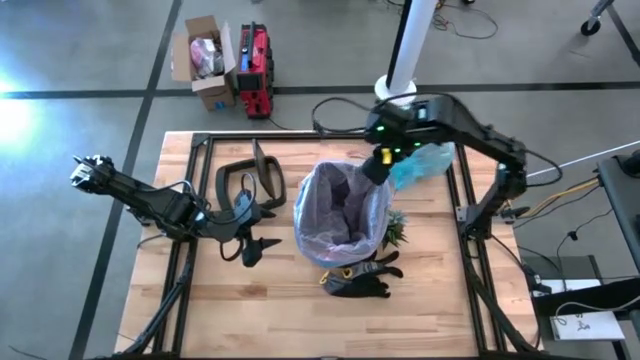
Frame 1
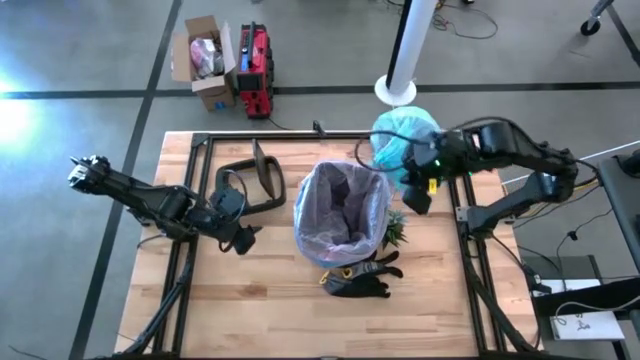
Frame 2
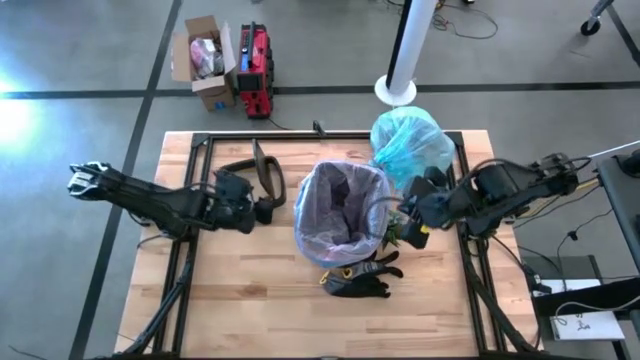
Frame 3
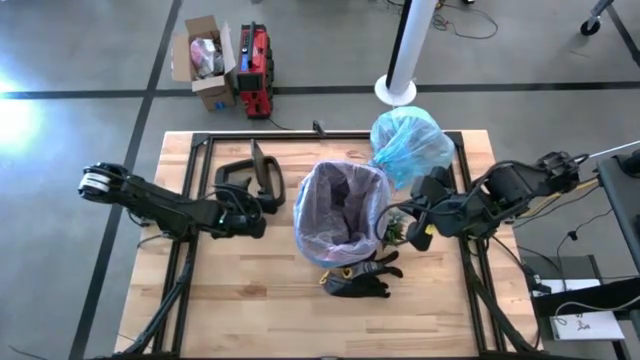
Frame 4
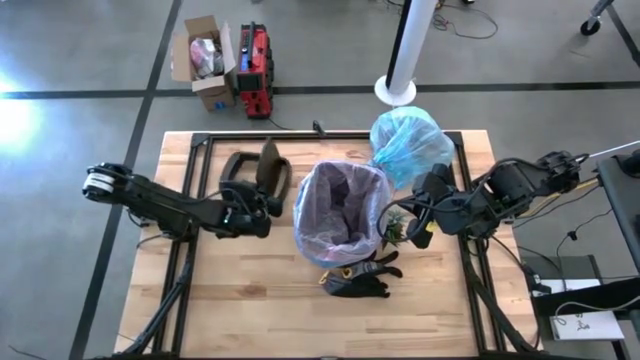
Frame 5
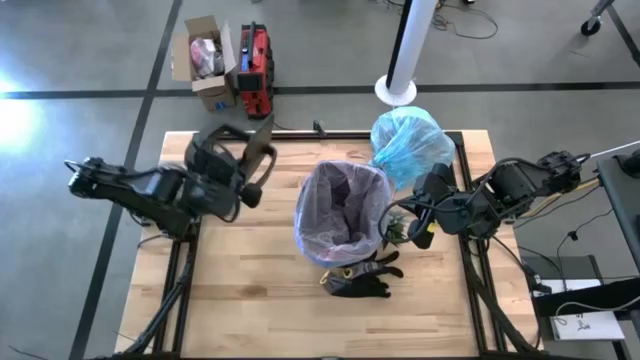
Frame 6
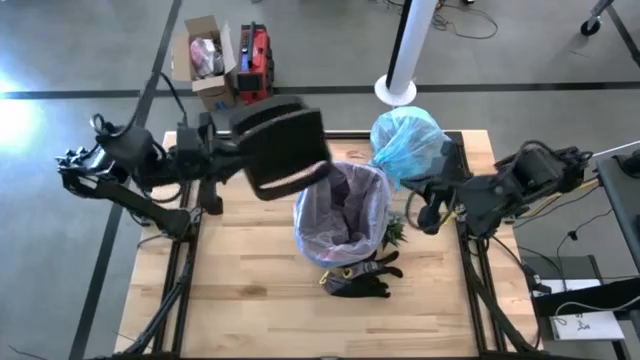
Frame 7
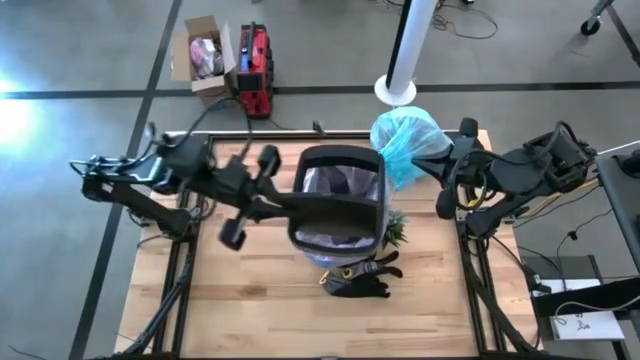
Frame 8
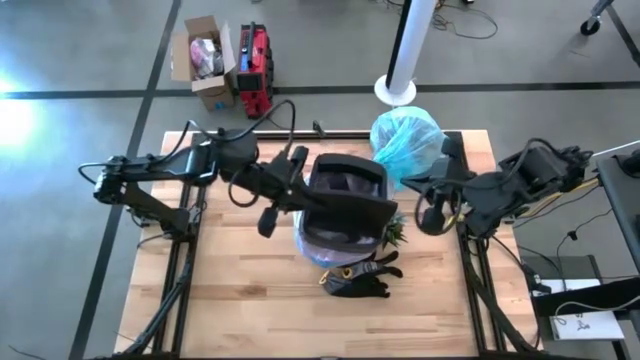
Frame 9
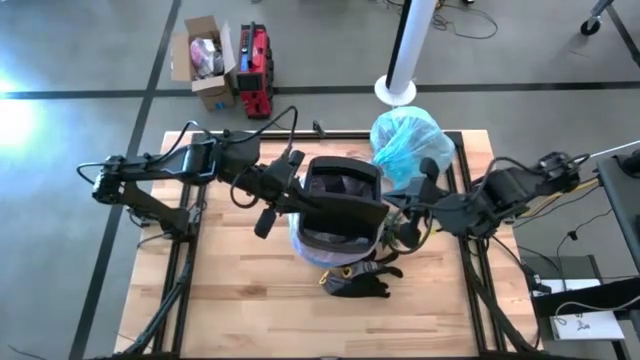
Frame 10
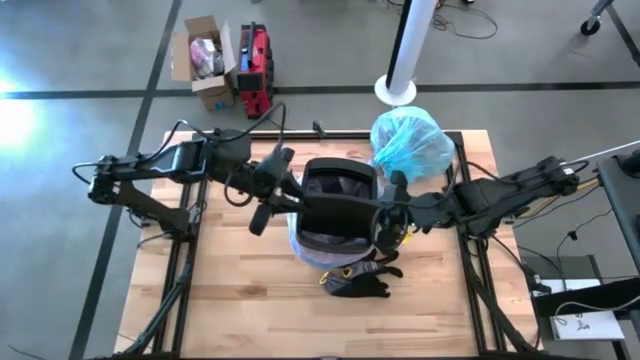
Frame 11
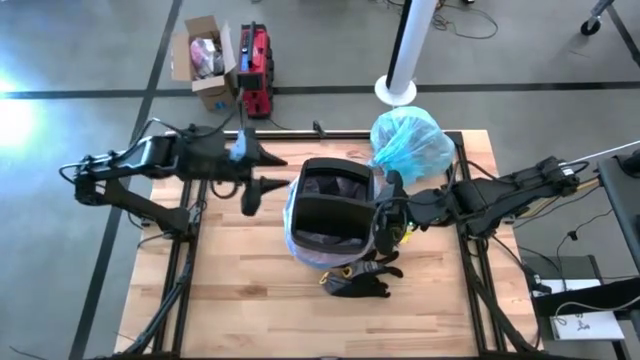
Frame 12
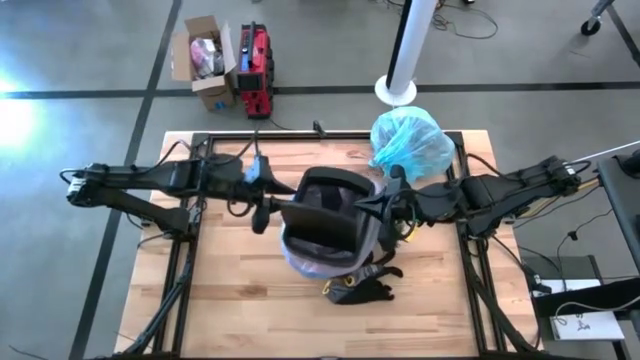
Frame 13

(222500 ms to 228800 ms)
Task: place trash/remove bag and relplace
Put the trash bin lid on the trash bin

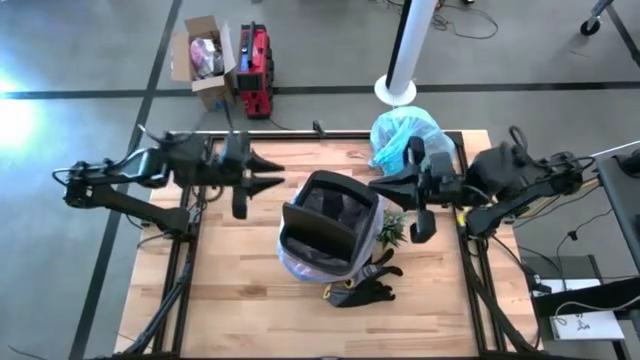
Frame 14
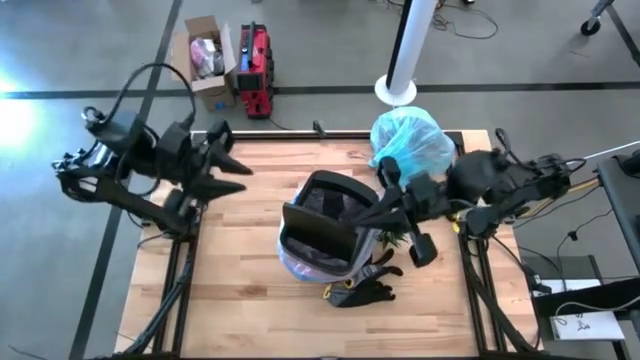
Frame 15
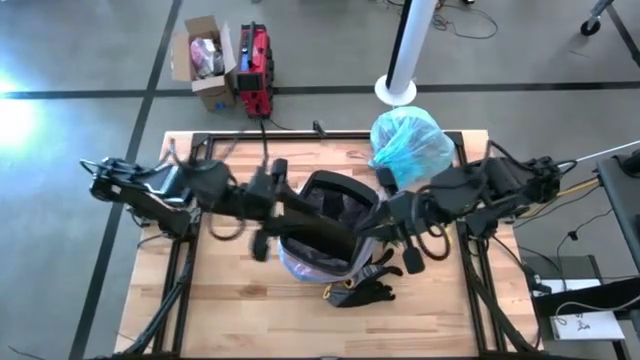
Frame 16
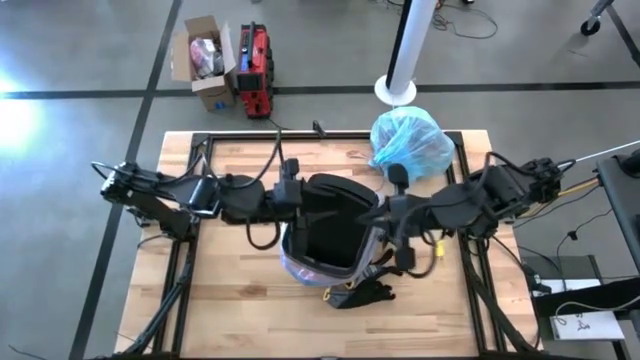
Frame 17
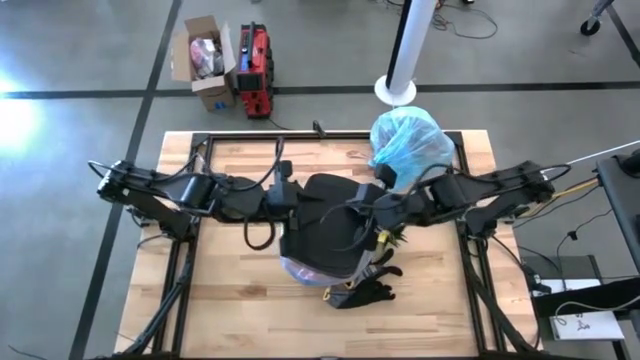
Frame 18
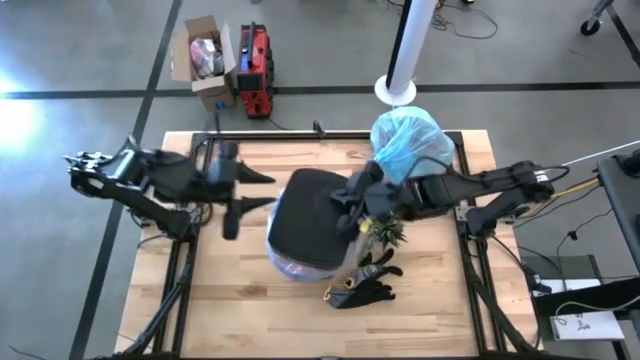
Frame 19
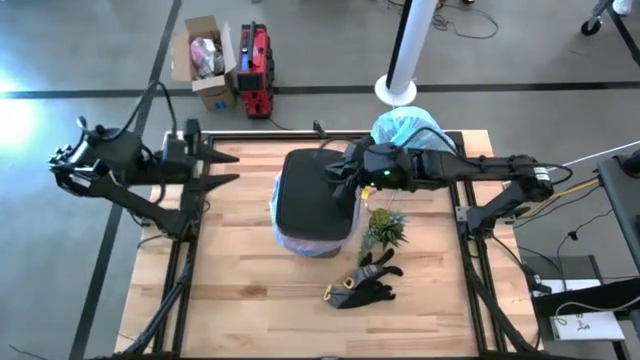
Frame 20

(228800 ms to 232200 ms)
Close the trash bin lid

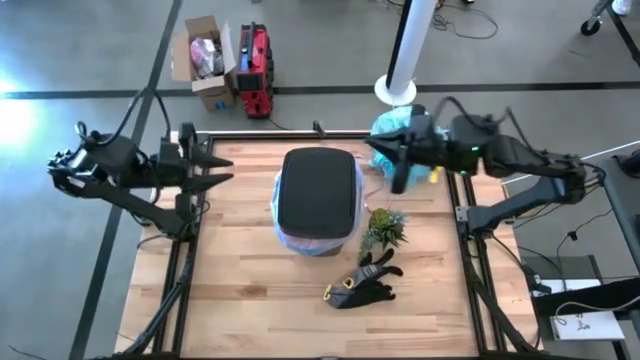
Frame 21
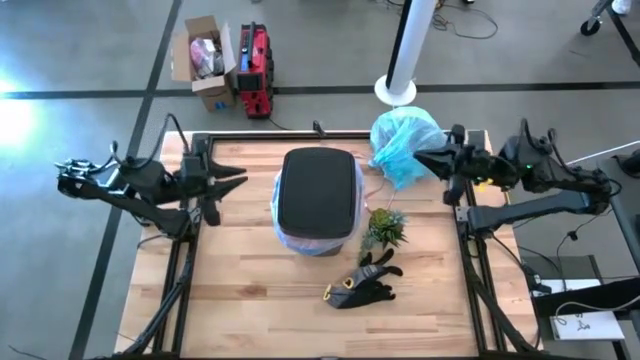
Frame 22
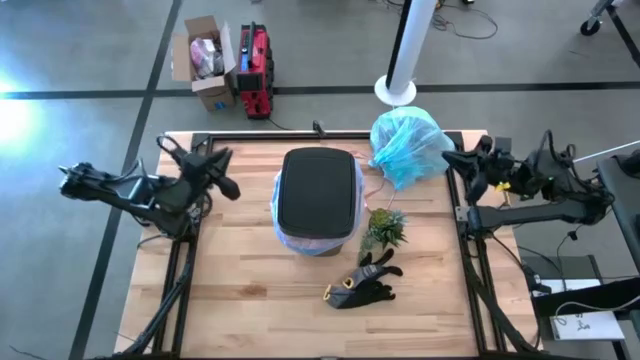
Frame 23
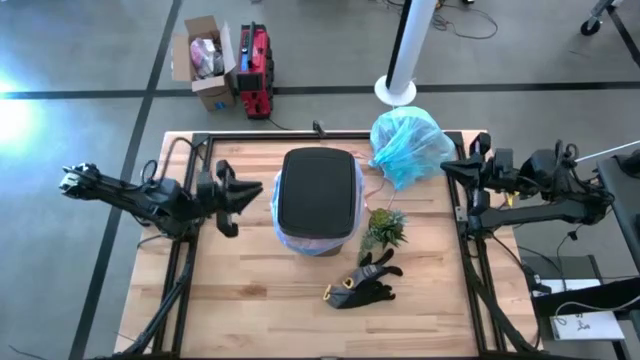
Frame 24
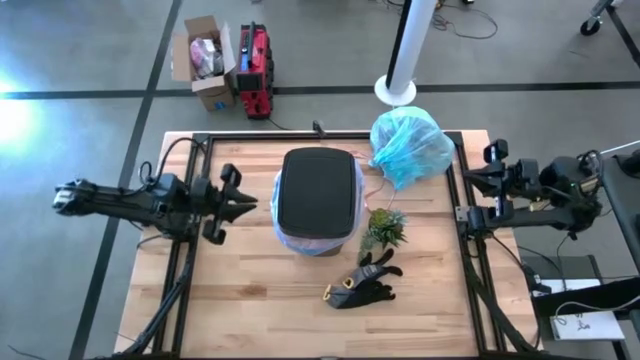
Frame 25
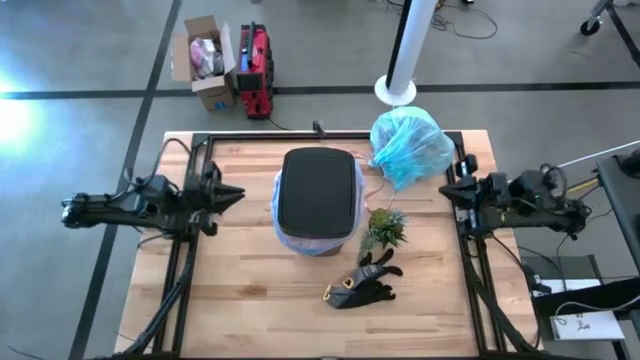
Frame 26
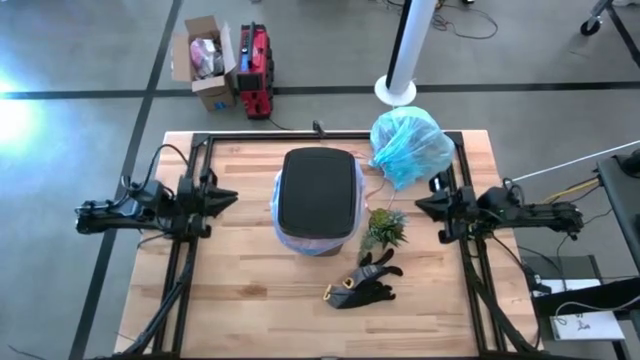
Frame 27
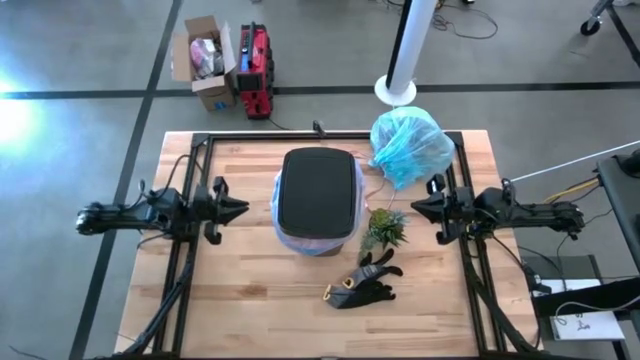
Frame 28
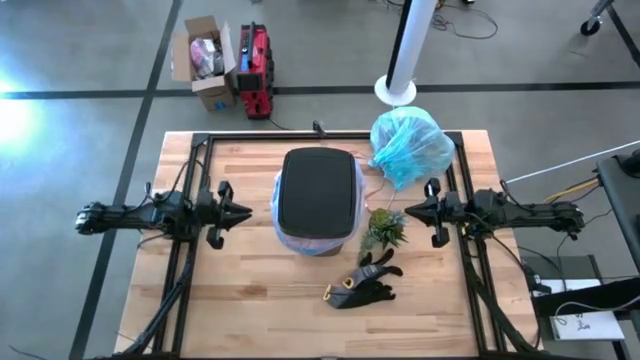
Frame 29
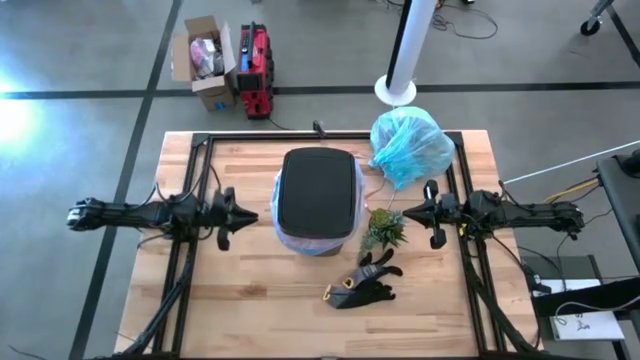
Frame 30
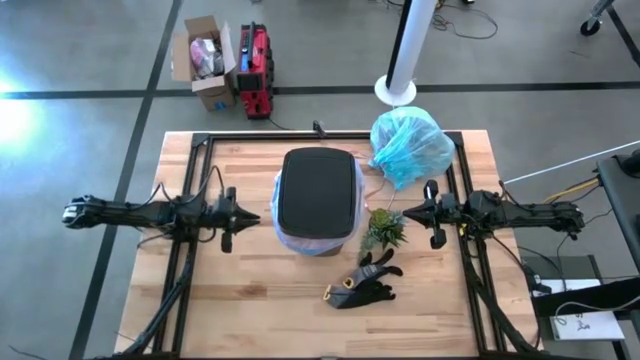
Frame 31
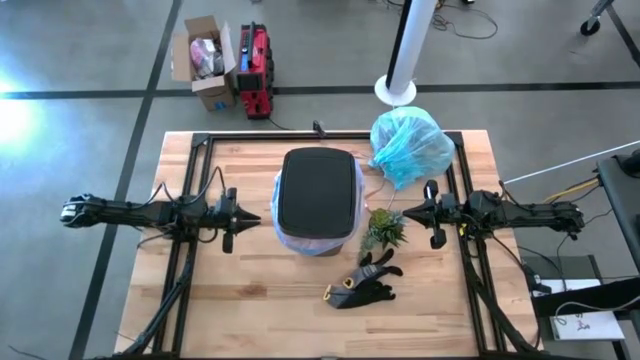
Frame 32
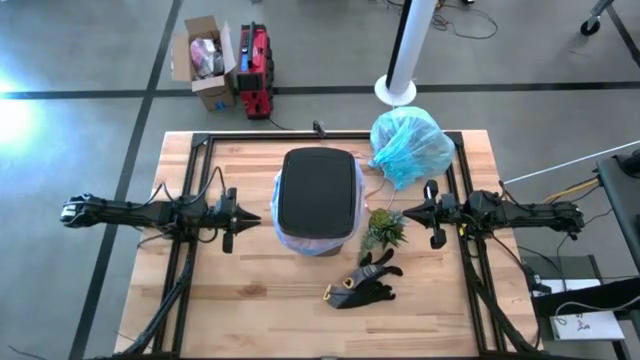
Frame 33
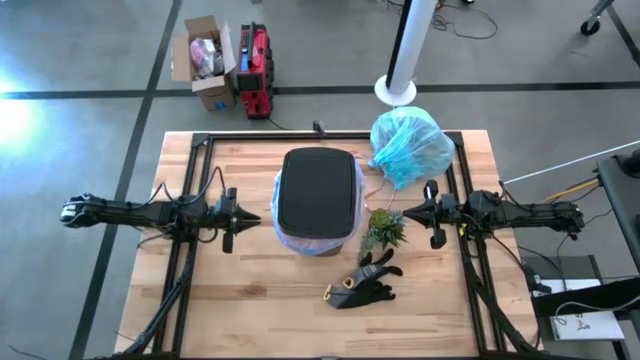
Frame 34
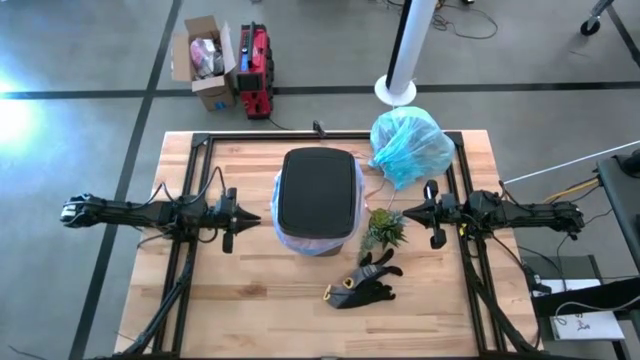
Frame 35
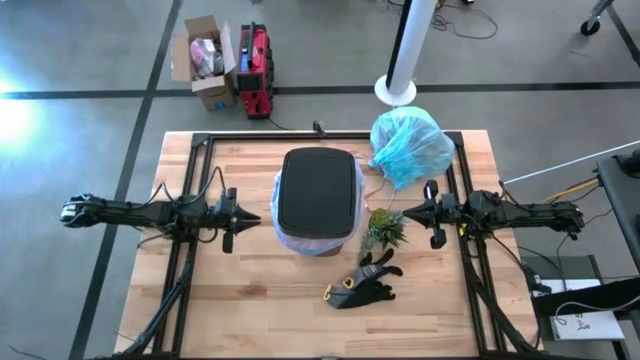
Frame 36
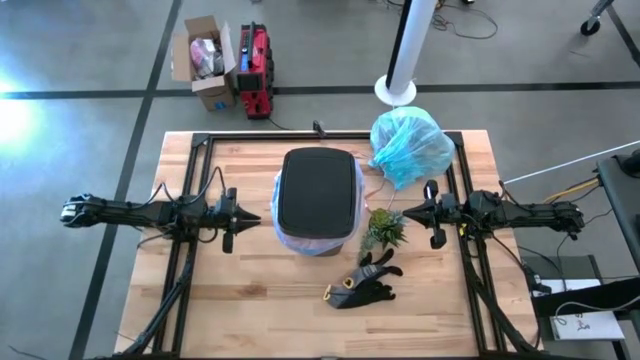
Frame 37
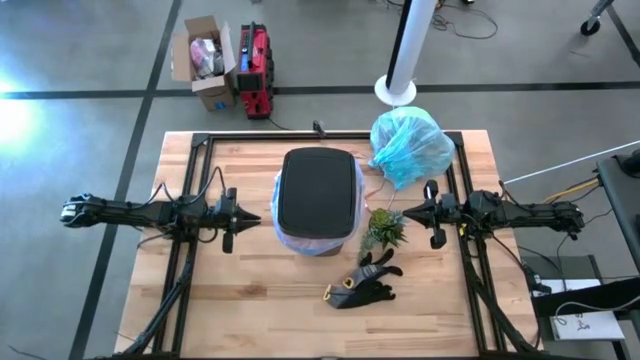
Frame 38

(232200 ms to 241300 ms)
Return to Home Position

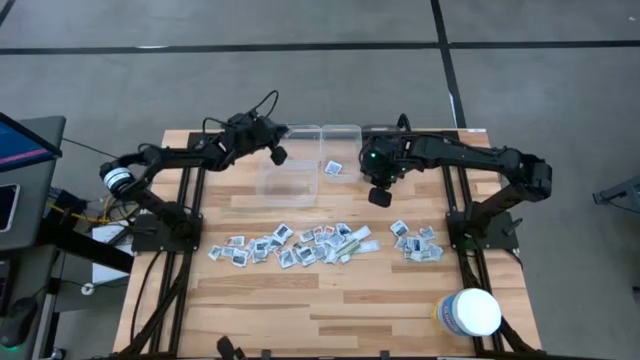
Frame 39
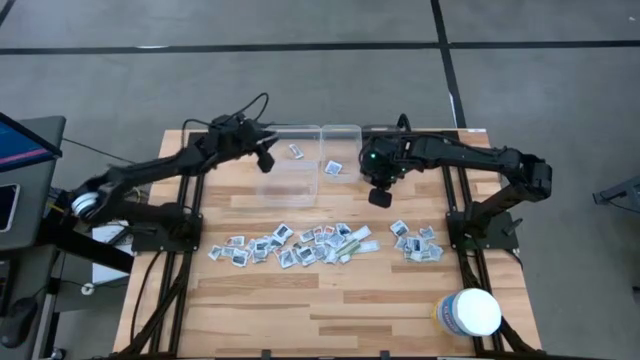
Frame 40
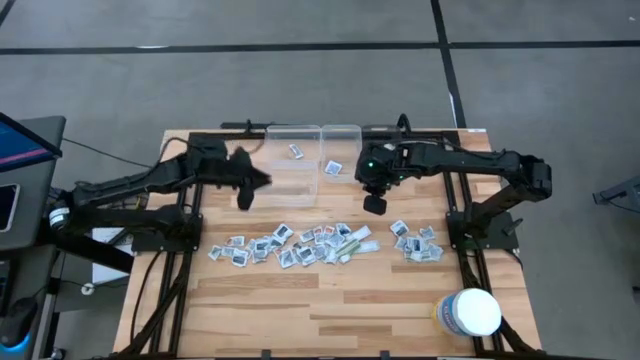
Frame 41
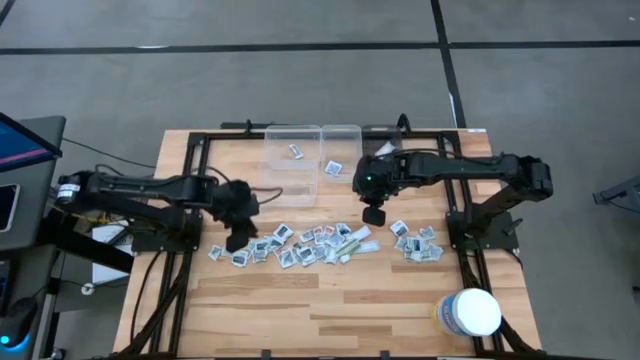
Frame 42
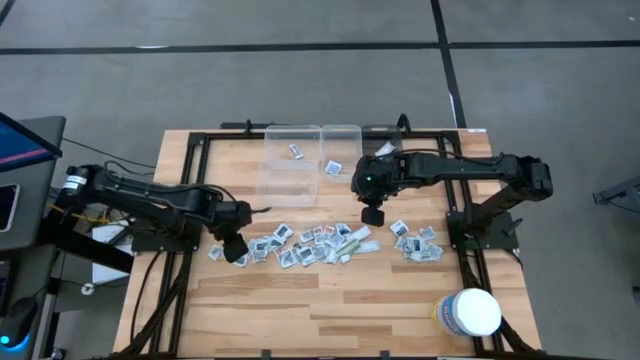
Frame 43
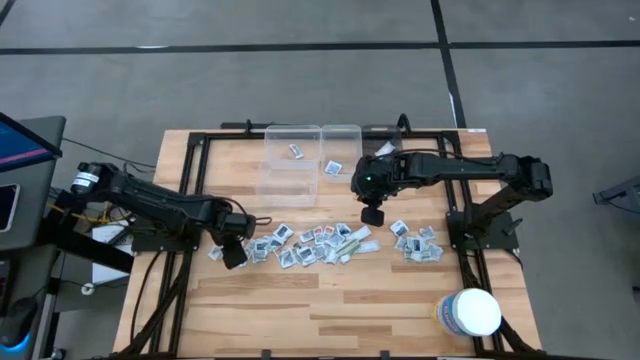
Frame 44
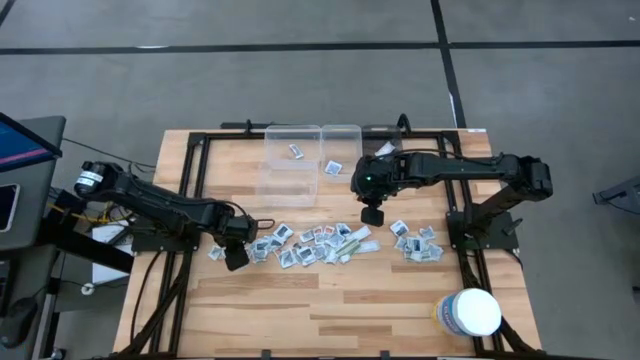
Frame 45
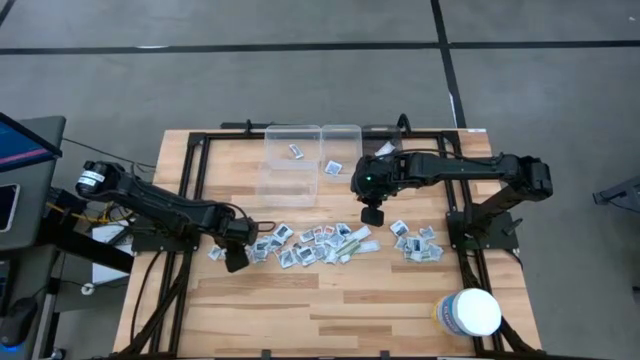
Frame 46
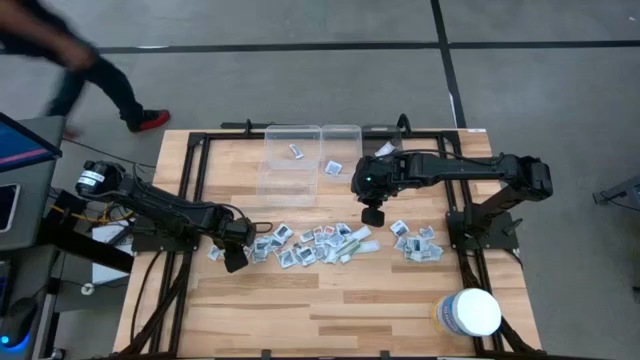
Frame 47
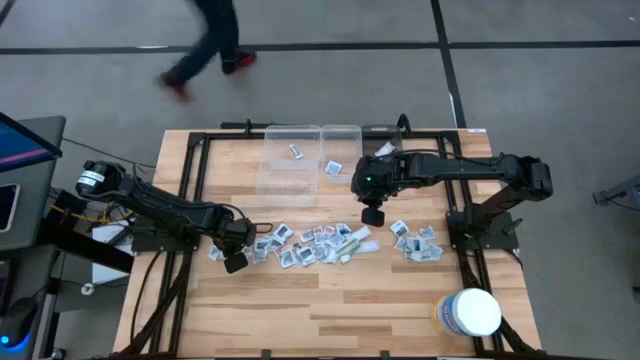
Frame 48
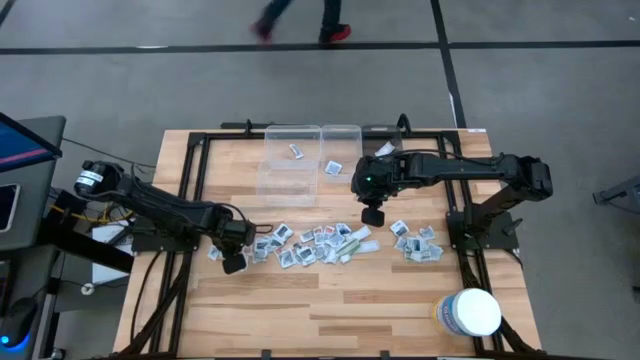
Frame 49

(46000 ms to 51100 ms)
Task: Pick & Place First Aid Supplies
Put the towelette pack into the bottom transparent bin
